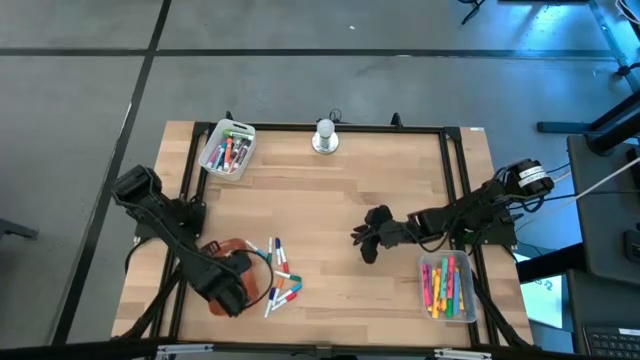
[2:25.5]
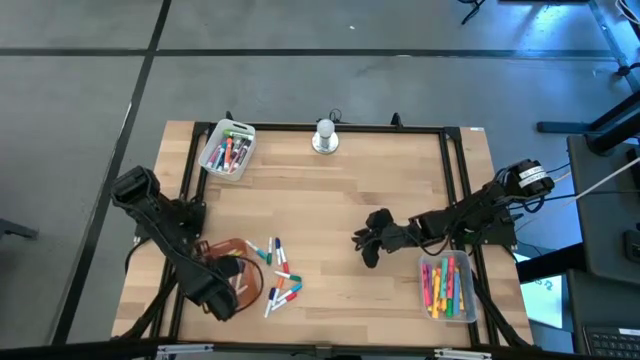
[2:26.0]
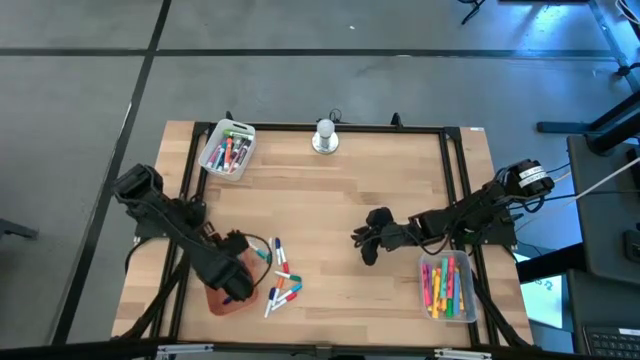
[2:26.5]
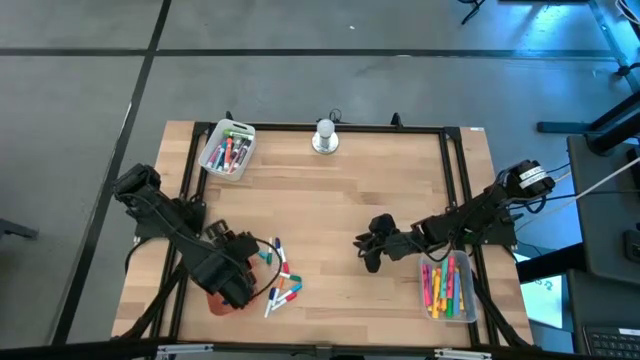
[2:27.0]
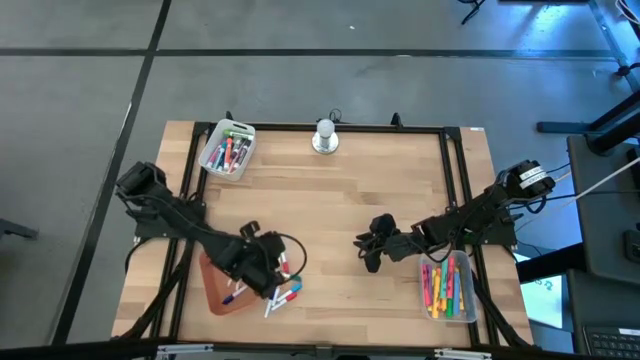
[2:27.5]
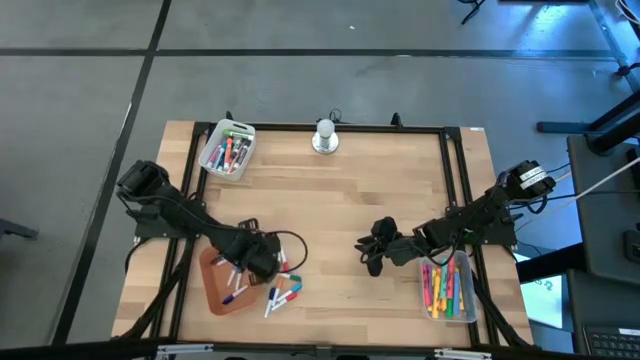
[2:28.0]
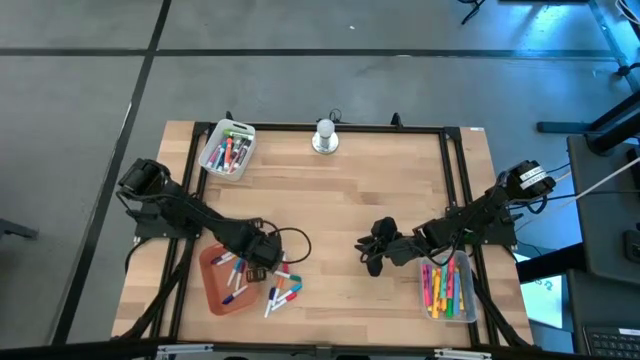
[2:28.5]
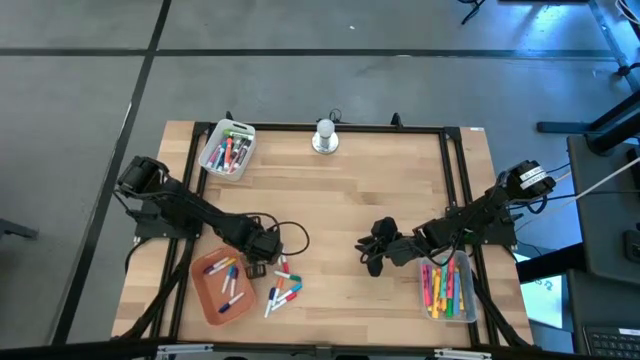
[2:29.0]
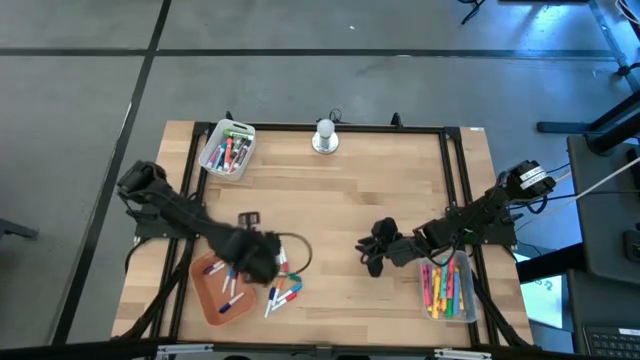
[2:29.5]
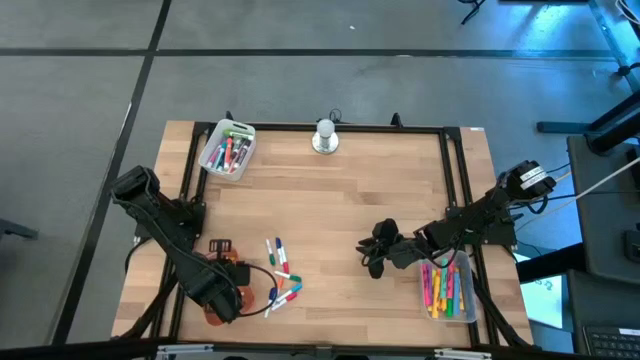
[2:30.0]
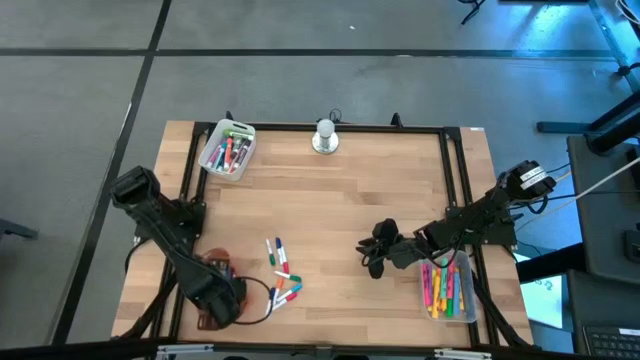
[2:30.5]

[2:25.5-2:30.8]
Task: Pick & Place Markers
Put the light blue and white highlighter pen into the orange bin

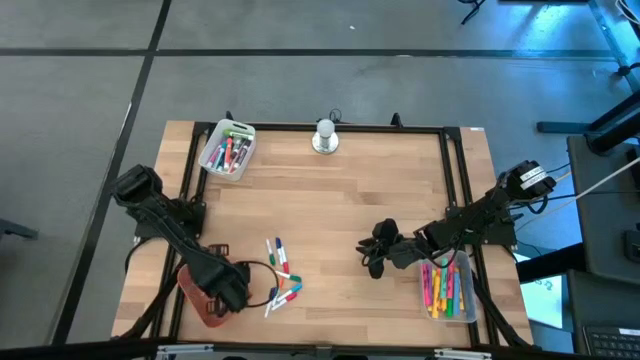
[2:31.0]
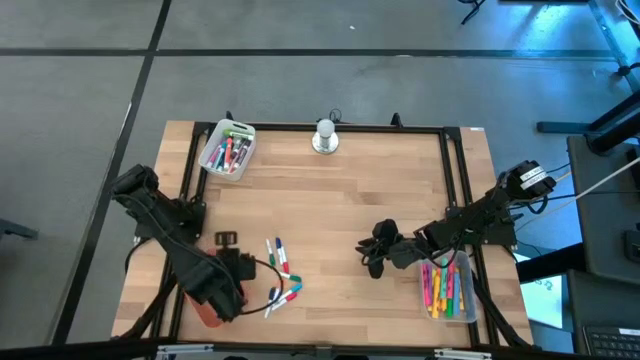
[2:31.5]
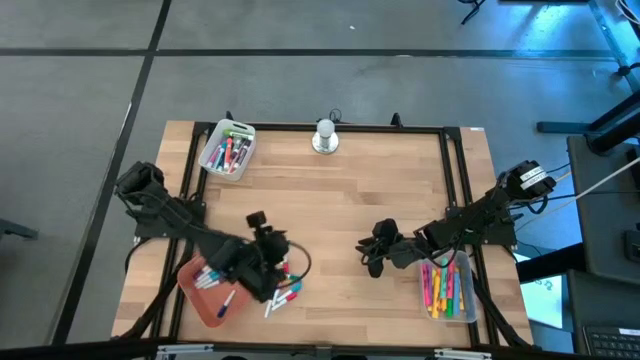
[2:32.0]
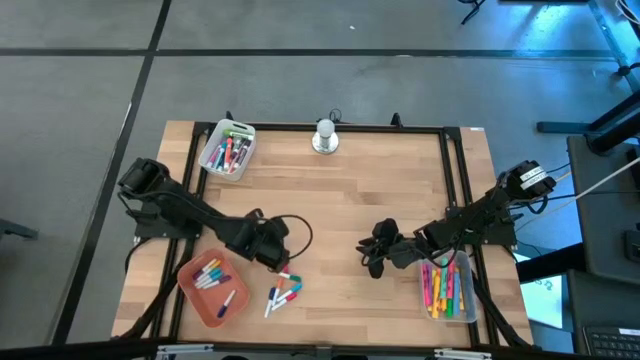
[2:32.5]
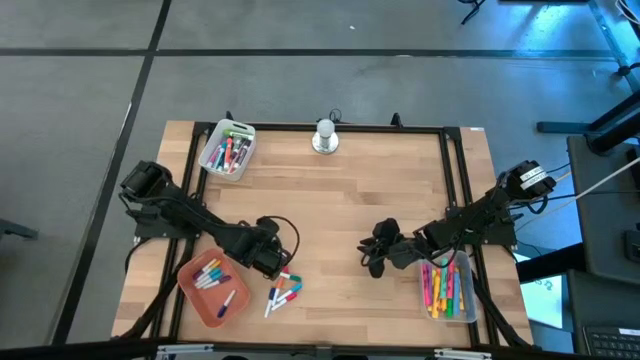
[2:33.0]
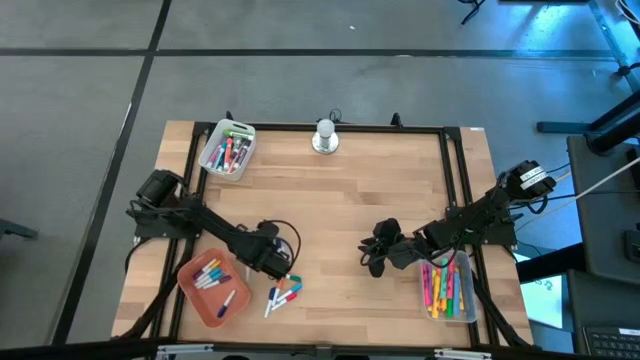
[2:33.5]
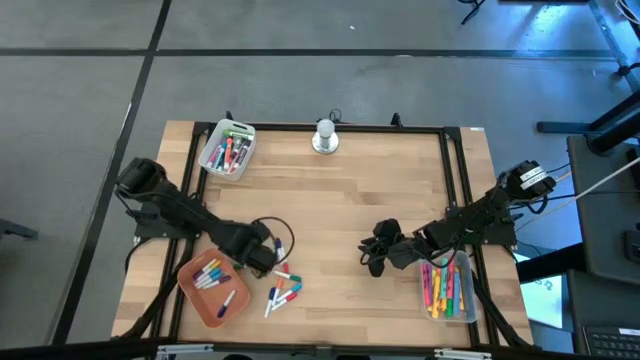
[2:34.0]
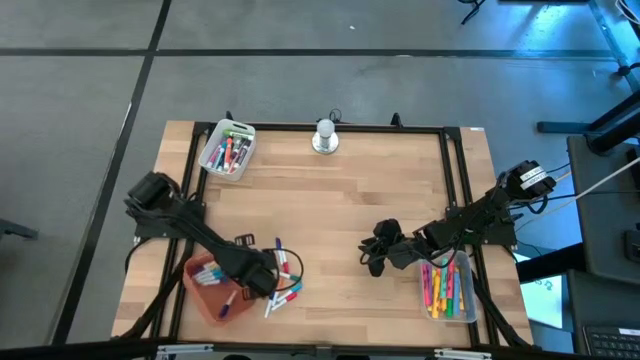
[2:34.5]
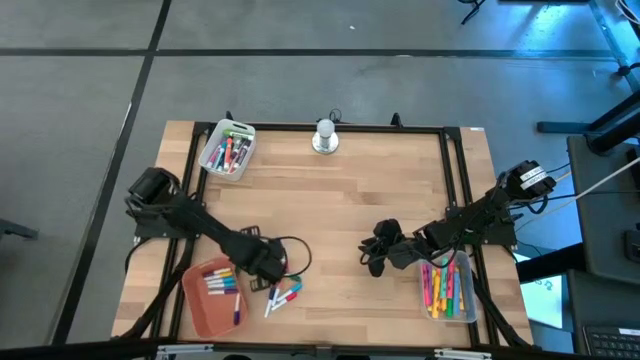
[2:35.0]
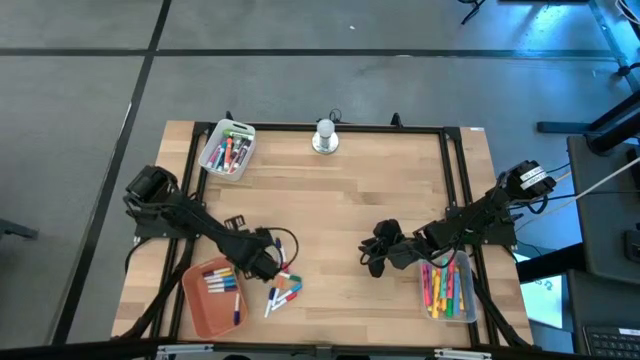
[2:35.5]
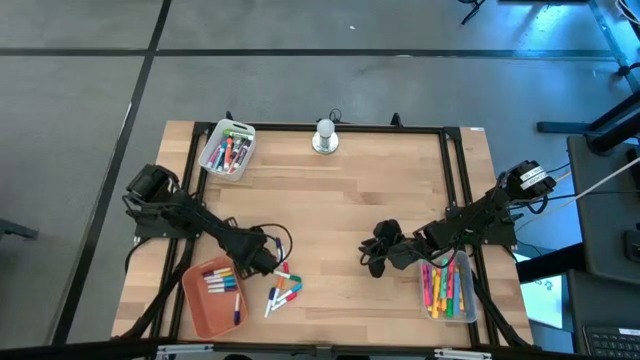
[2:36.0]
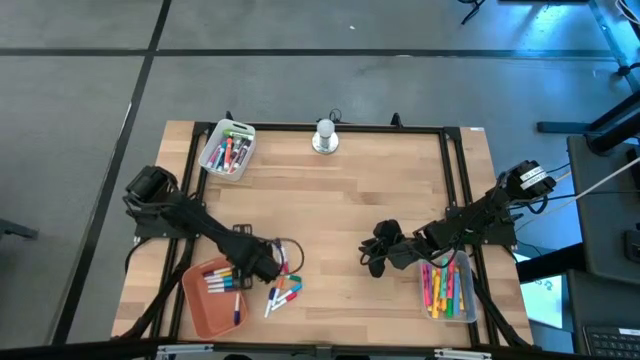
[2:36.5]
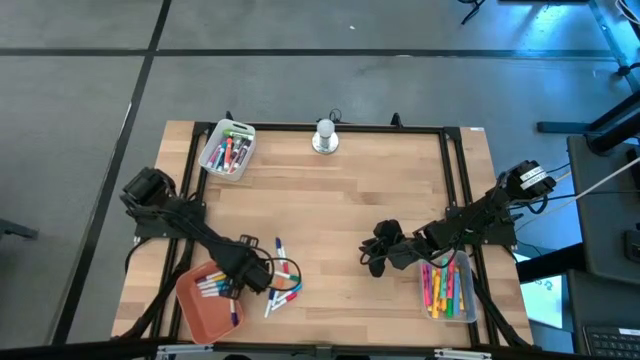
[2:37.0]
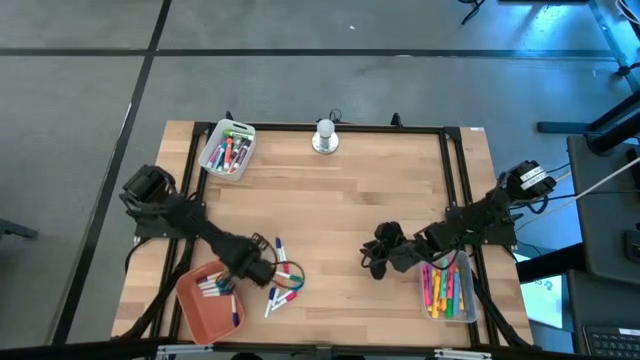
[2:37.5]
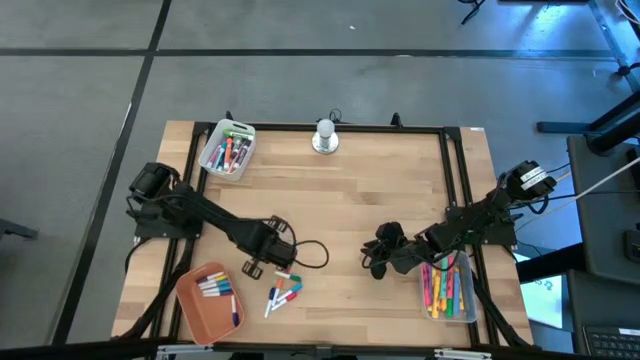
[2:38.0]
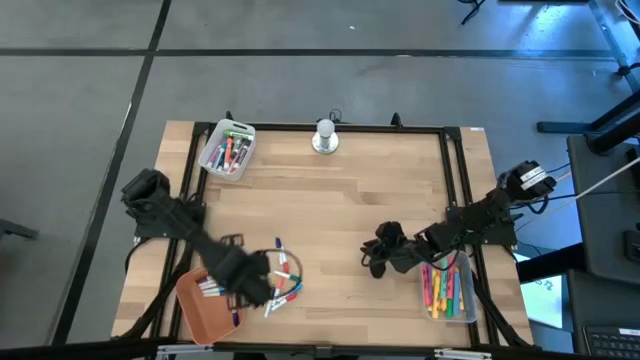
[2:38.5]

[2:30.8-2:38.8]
Put the green and white highlighter pen into the orange bin

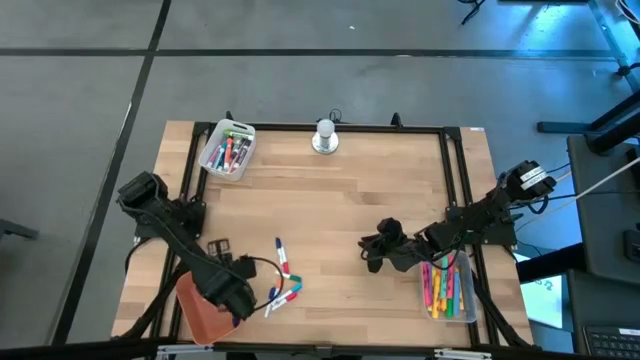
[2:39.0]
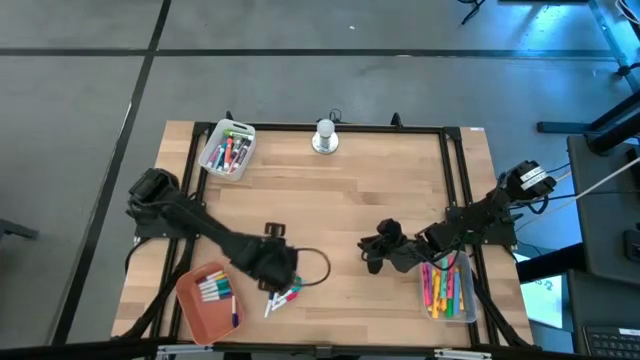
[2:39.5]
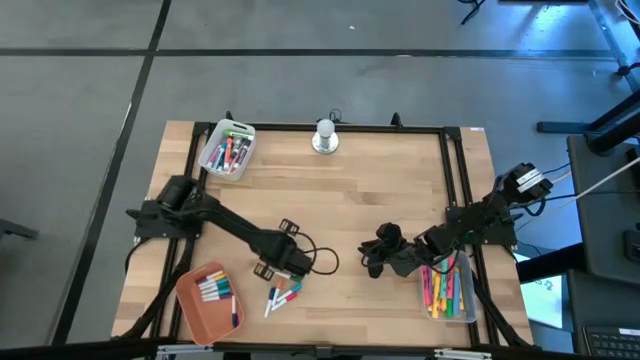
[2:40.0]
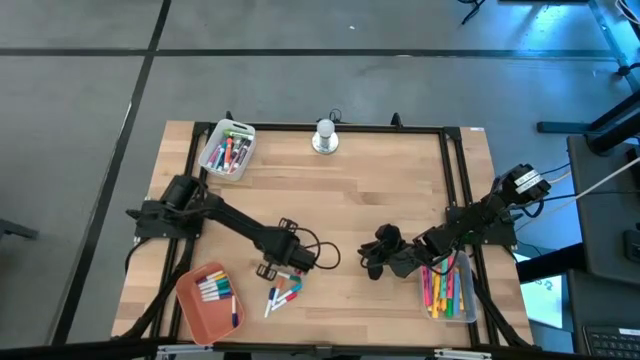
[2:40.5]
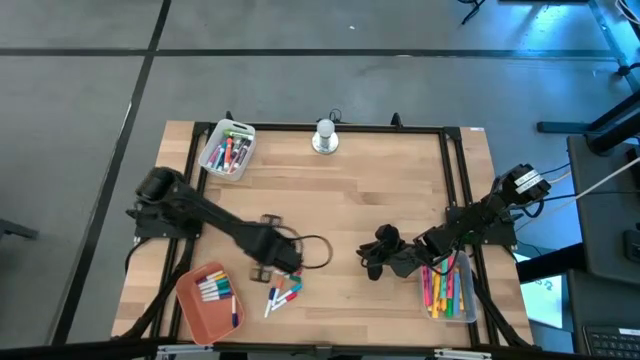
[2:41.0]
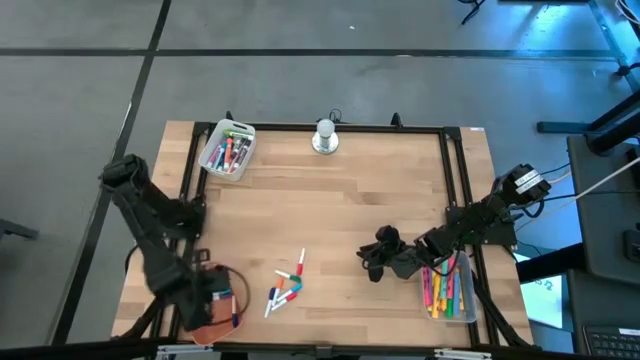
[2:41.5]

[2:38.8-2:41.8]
Put the blue and white highlighter pen into the orange bin

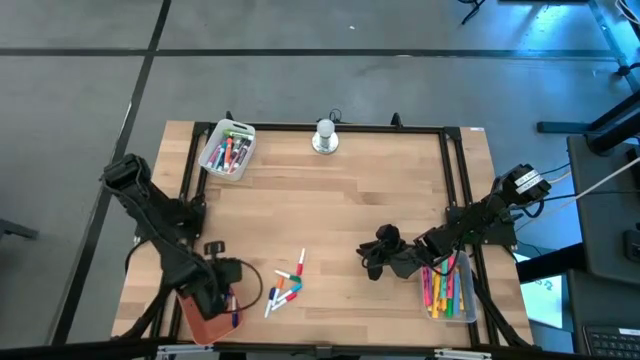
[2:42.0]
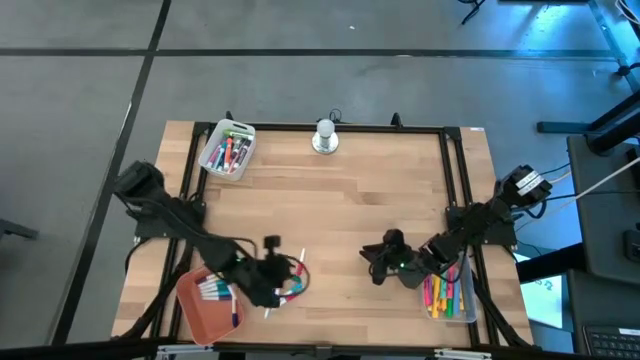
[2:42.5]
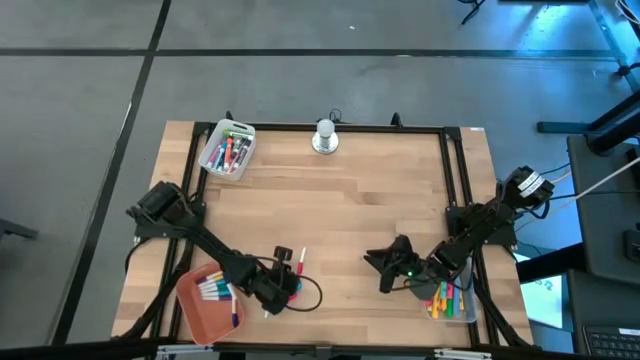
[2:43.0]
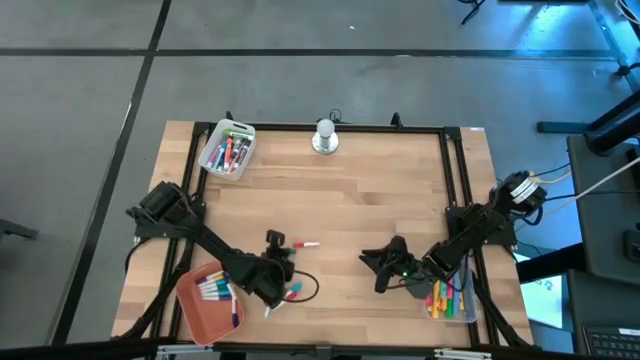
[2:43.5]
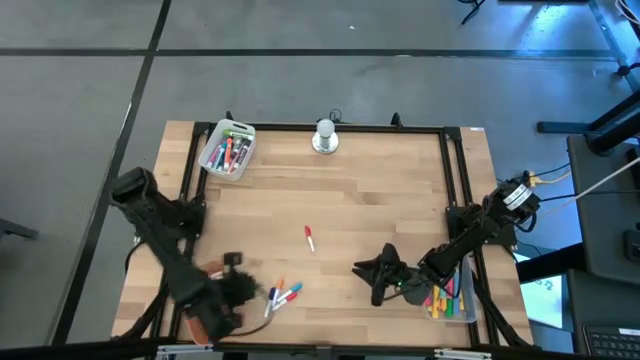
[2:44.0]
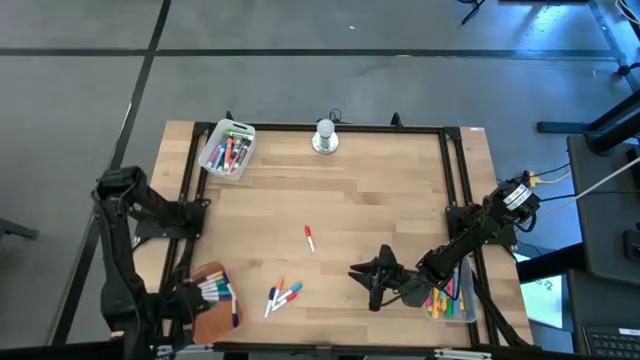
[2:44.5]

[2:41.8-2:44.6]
Put the dark green and white highlighter pen into the orange bin

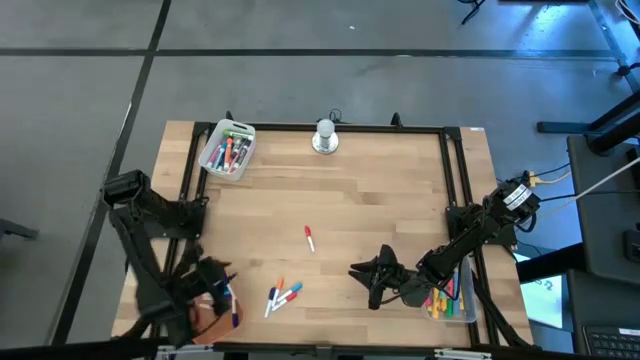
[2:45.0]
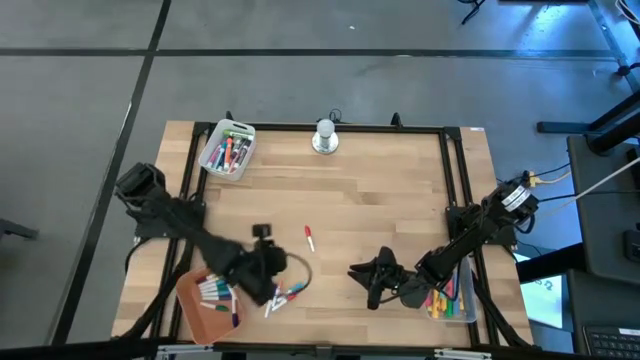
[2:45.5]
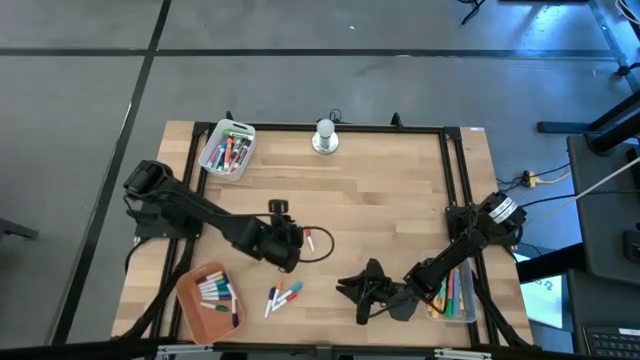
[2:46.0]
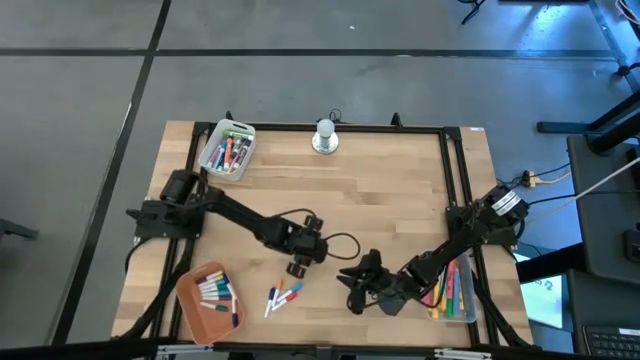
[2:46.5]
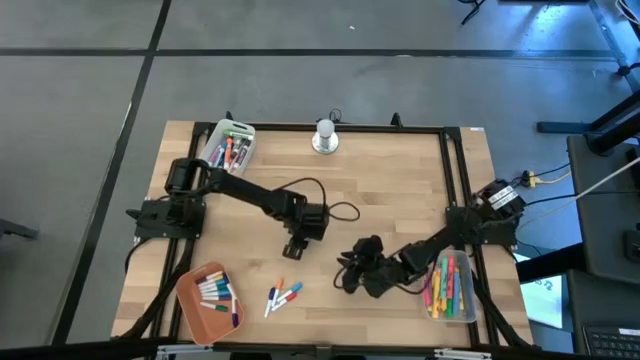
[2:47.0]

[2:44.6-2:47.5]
Put the red and white highlighter pen into the orange bin
